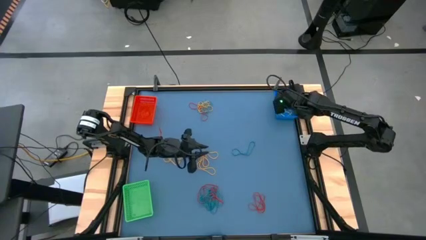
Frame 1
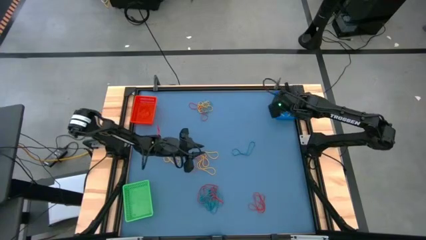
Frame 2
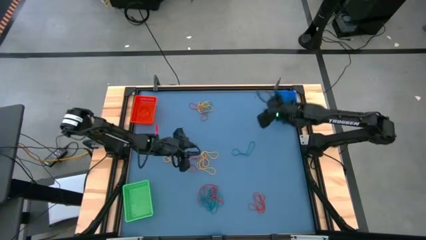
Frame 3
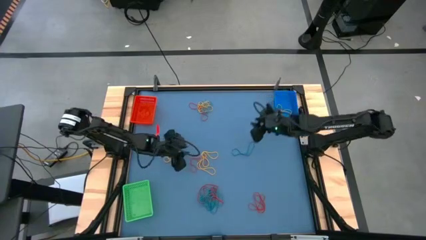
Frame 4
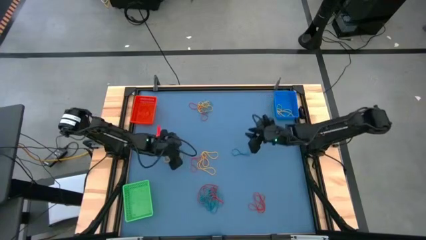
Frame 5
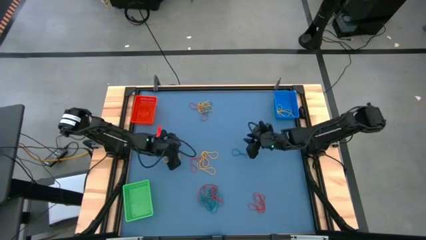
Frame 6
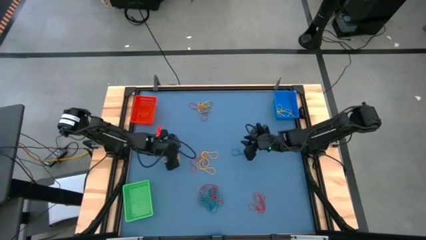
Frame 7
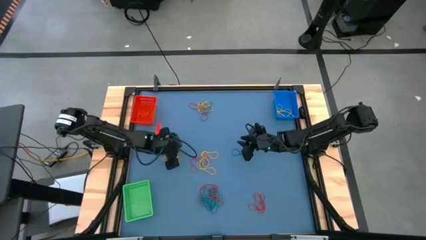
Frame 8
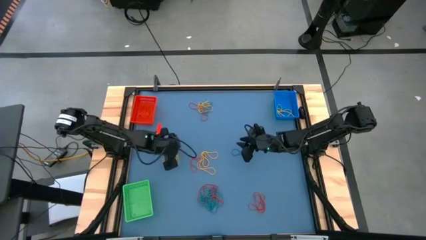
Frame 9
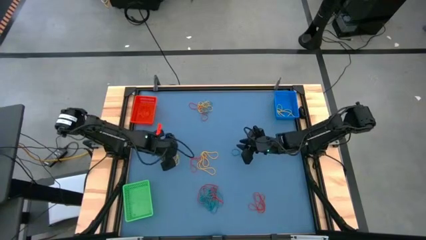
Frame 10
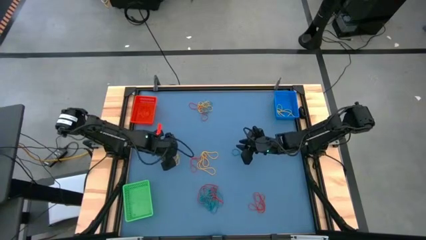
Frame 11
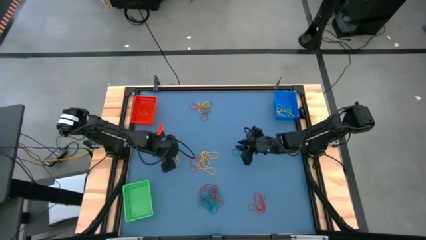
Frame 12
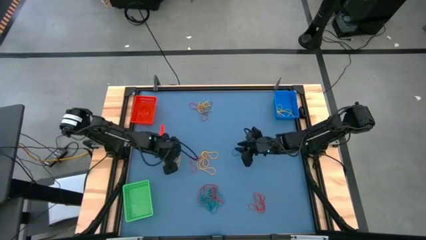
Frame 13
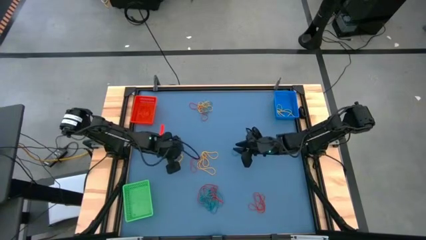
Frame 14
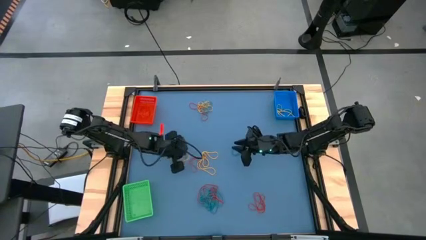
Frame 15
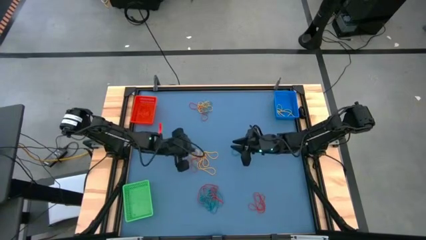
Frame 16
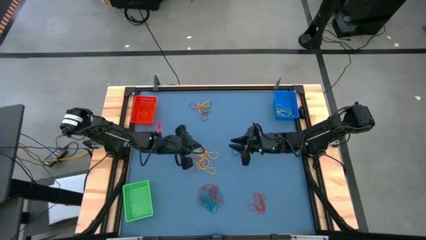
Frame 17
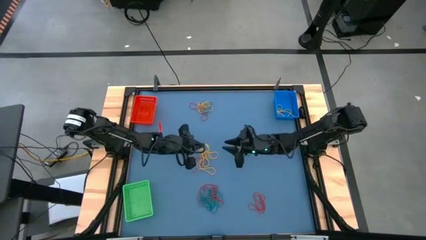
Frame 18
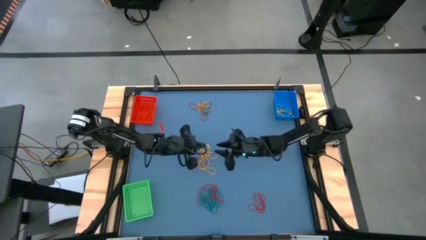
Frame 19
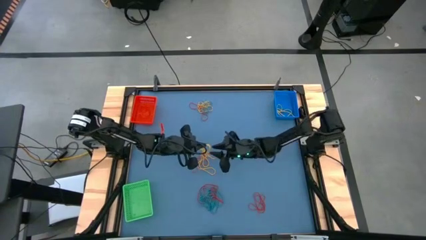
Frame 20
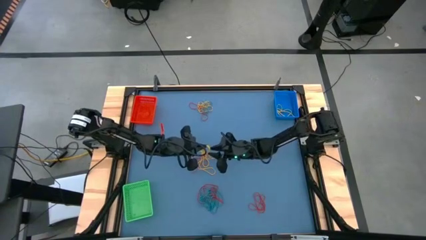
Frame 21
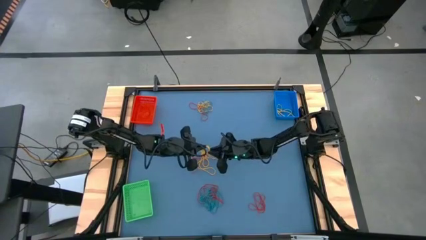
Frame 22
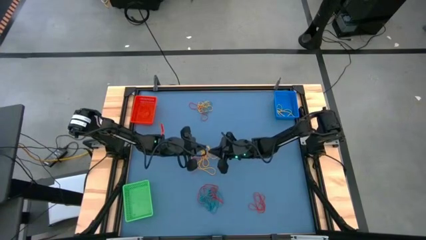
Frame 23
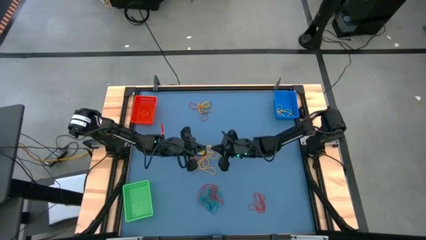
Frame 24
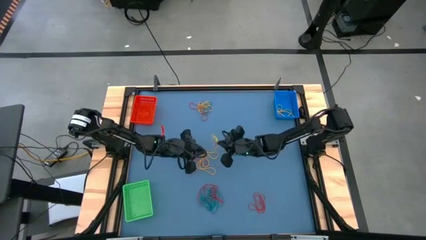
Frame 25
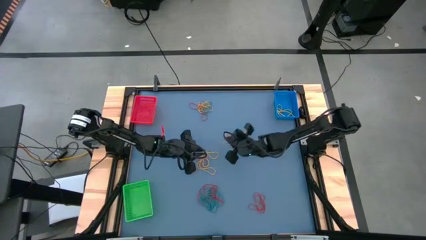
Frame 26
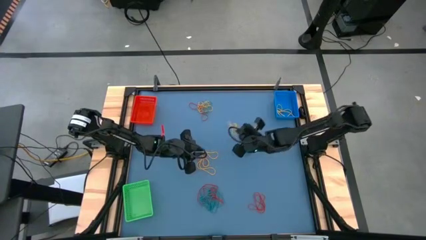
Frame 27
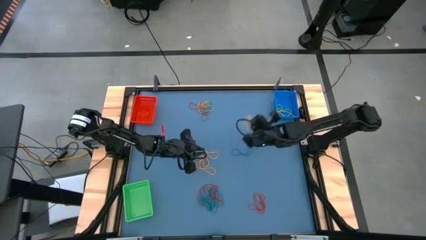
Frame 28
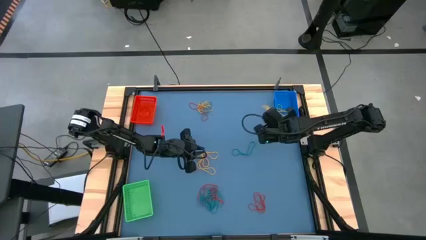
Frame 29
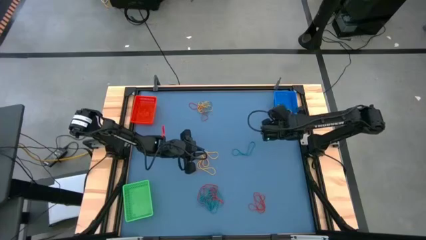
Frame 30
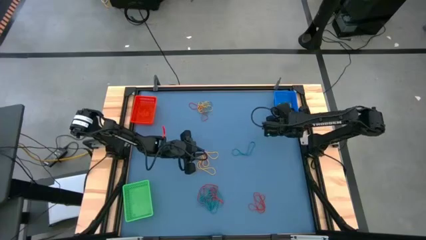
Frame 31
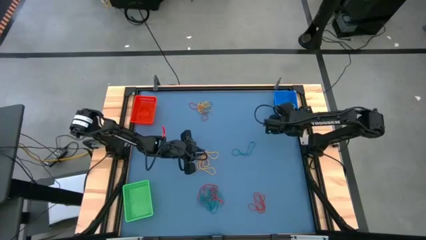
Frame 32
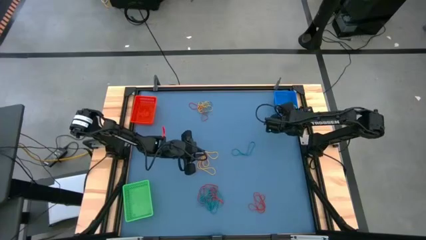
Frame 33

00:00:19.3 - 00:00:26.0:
Task: Sort rubber bands into baskets
Put the yellow rubber band into the blue basket

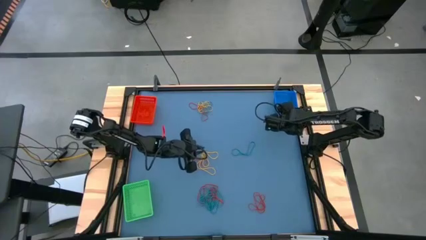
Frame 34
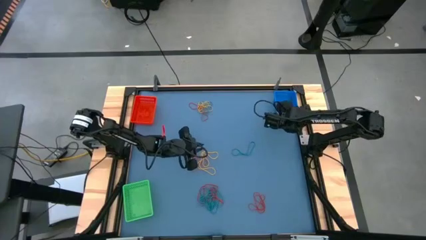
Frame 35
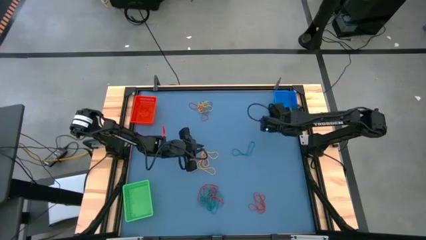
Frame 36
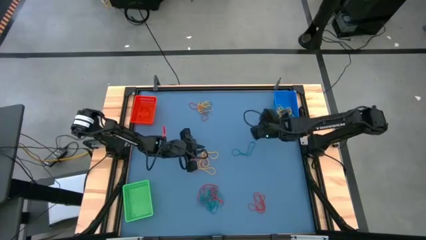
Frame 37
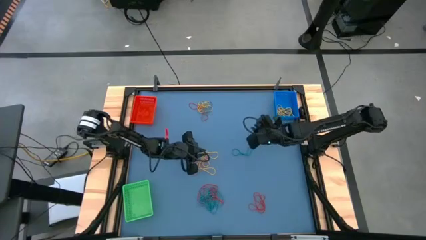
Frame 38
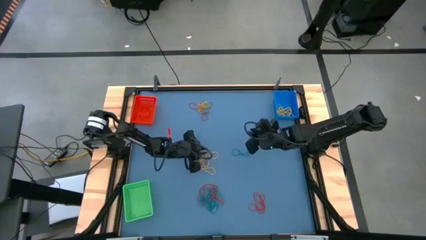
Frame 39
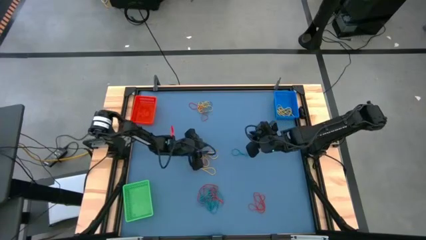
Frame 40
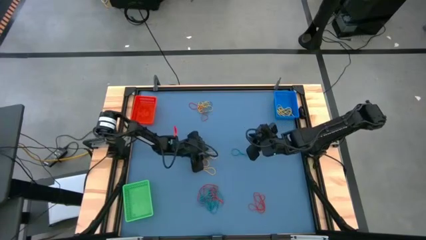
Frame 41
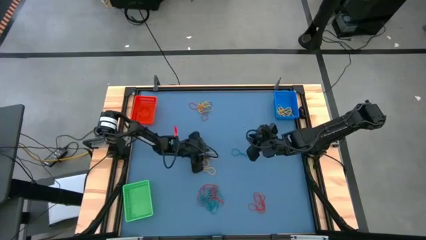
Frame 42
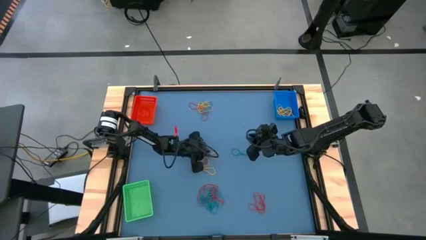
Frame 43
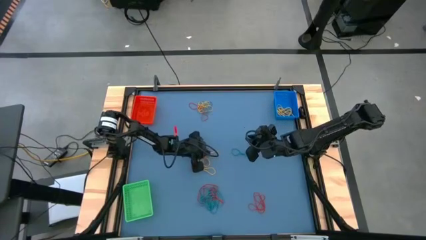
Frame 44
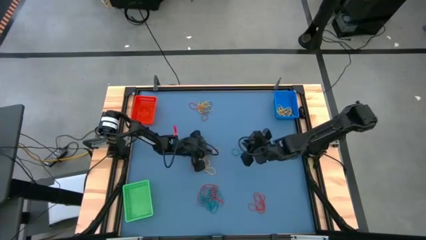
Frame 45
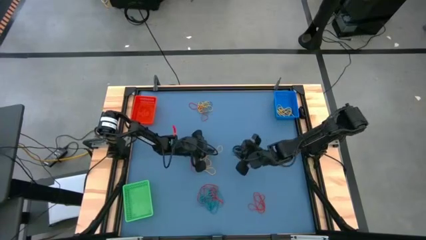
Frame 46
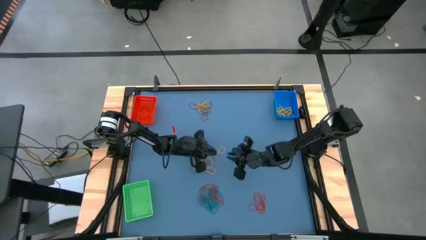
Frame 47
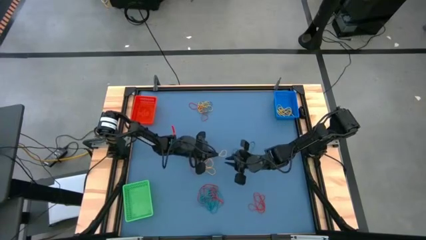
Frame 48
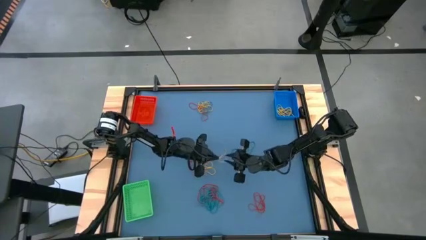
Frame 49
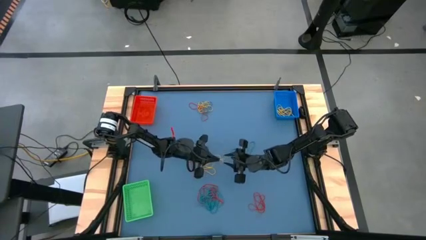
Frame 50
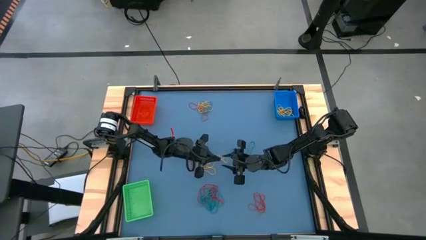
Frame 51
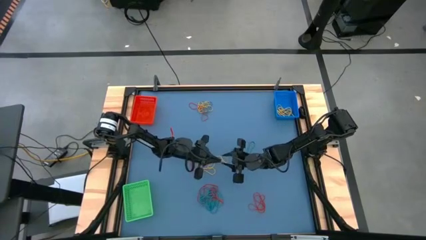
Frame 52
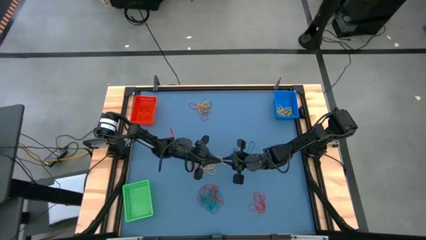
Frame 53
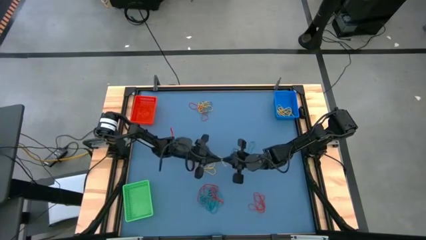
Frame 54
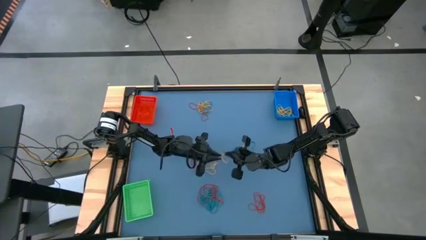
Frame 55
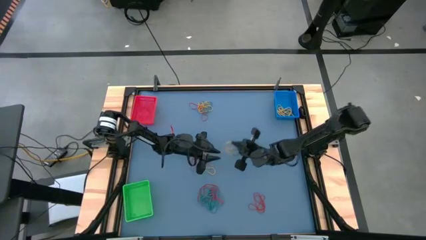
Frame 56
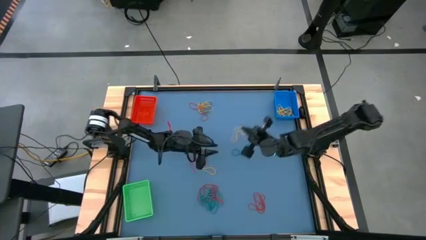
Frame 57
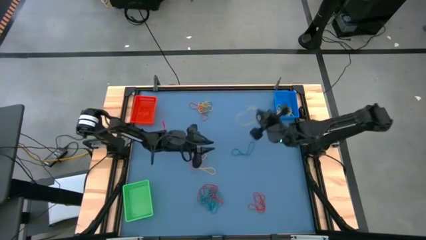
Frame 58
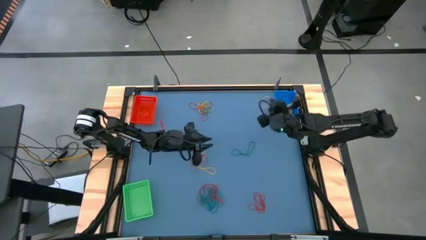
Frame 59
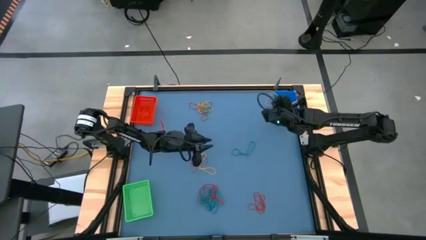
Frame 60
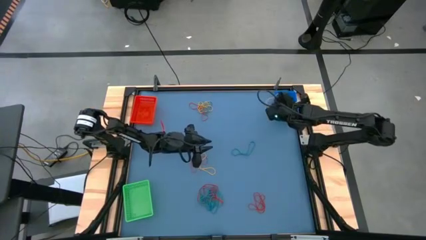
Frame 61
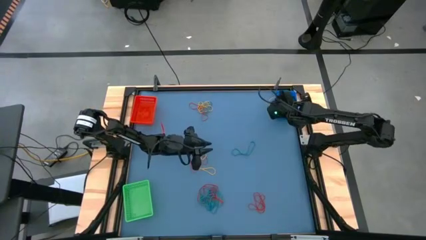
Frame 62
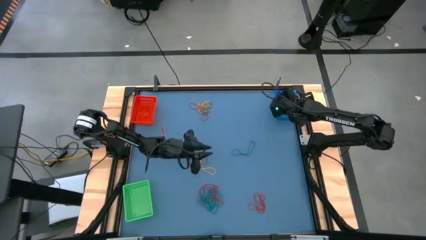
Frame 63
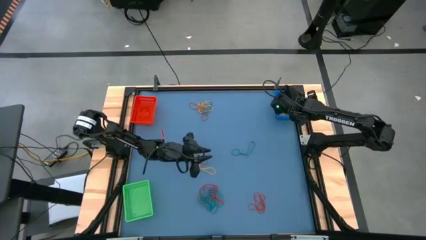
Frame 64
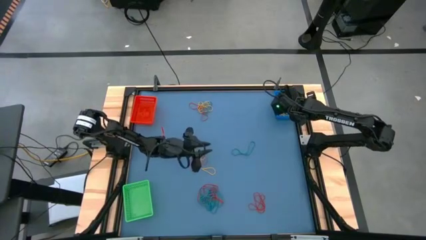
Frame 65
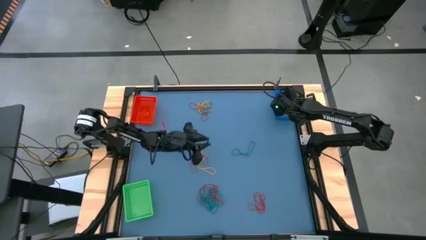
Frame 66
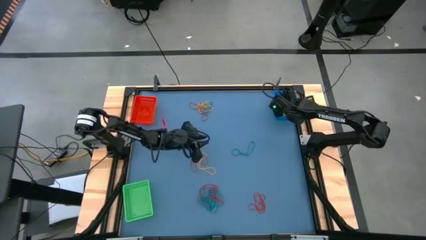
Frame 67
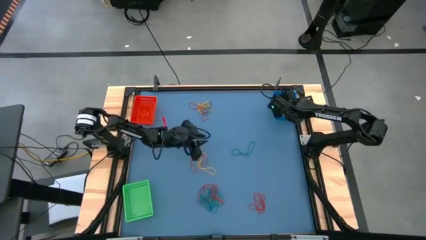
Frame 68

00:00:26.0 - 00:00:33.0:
Put the yellow rubber band into the blue basket

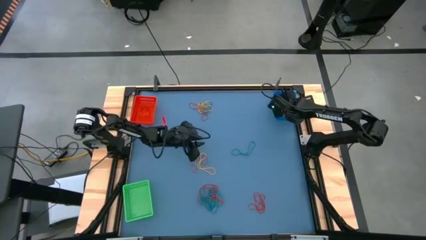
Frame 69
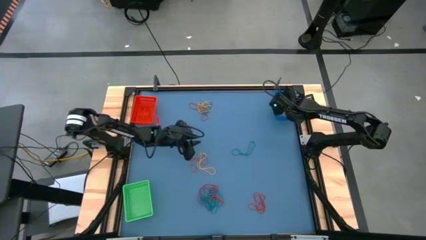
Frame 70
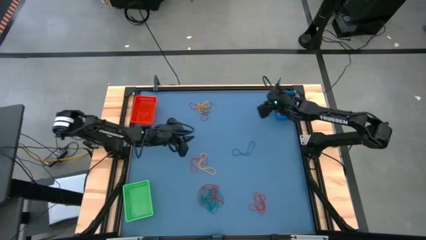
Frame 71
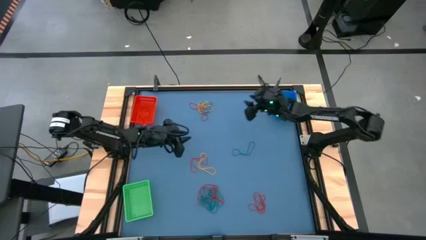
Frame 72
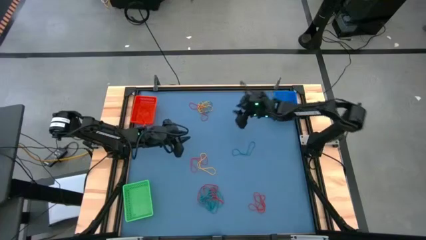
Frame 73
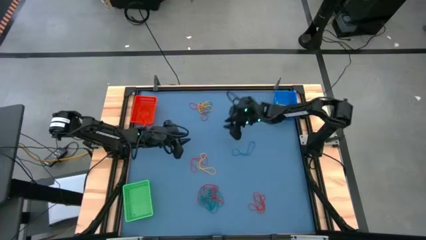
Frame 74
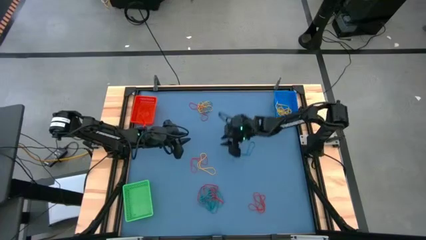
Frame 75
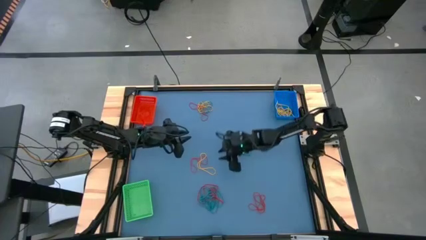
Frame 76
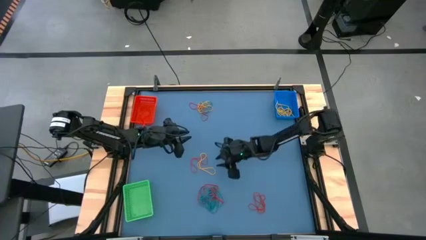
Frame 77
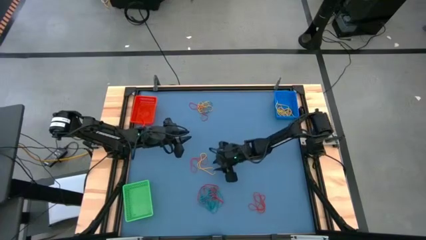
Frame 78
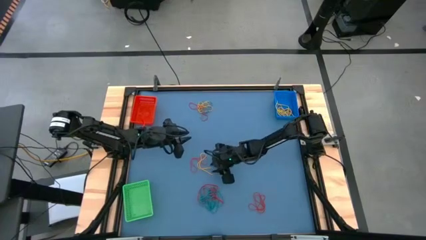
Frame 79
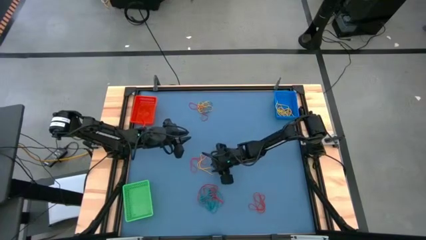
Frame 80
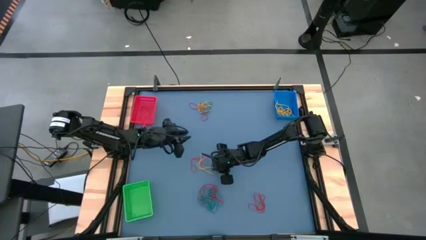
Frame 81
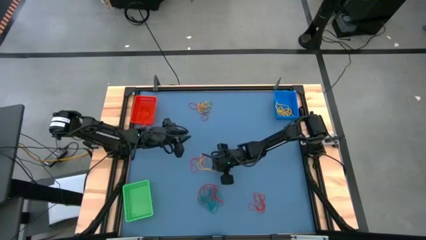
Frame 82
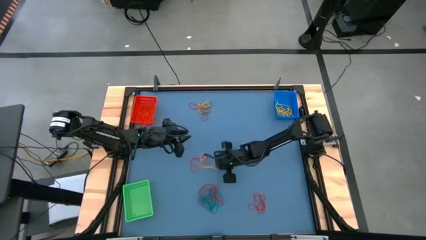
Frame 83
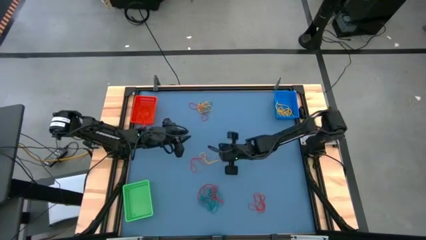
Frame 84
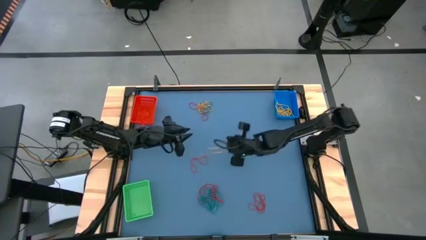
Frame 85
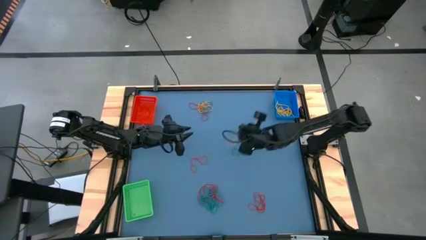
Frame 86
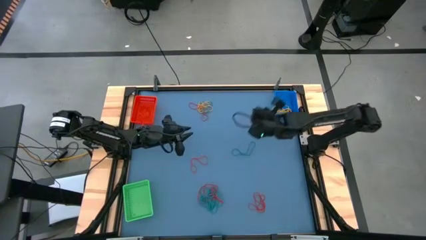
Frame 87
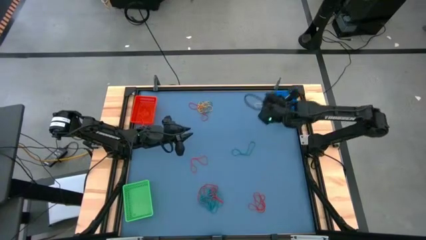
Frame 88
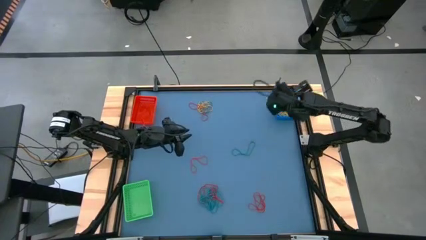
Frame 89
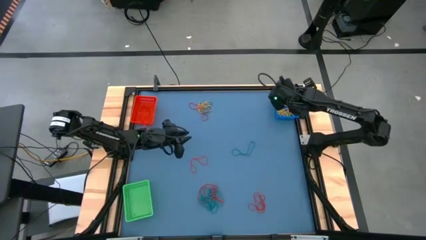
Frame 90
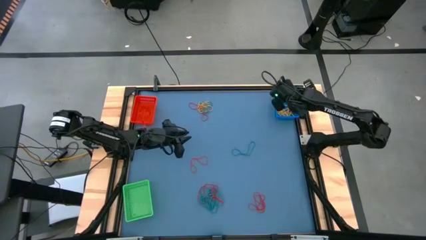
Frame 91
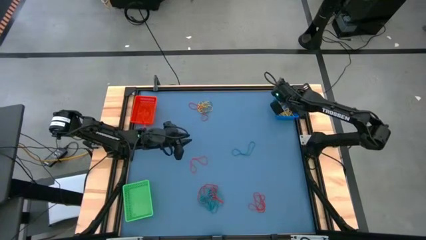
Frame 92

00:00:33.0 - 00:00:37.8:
Put the yellow rubber band into the blue basket
